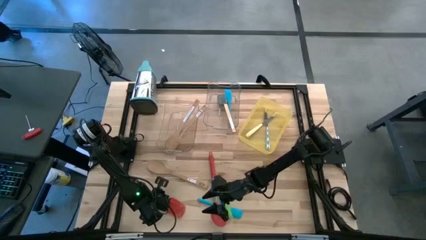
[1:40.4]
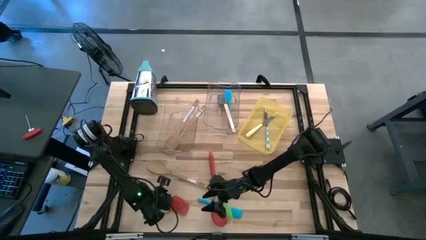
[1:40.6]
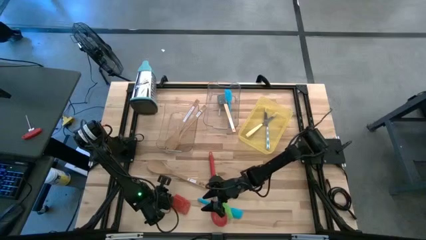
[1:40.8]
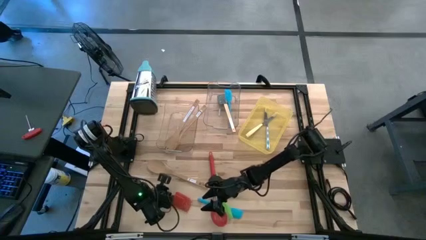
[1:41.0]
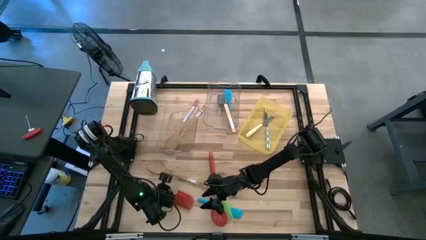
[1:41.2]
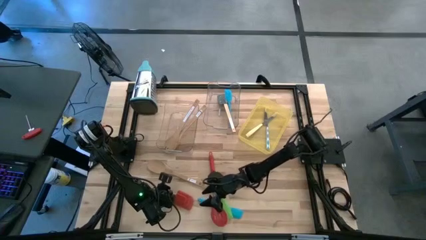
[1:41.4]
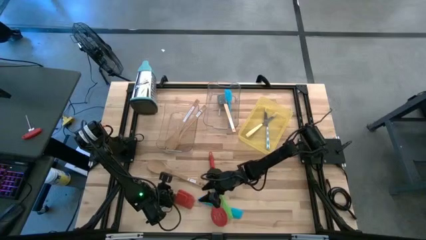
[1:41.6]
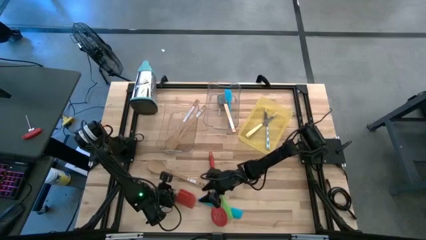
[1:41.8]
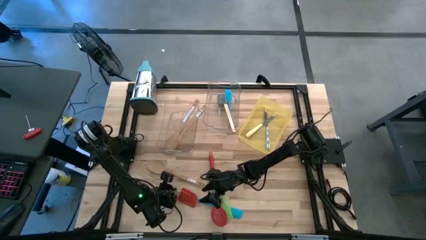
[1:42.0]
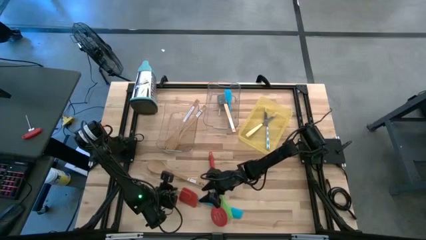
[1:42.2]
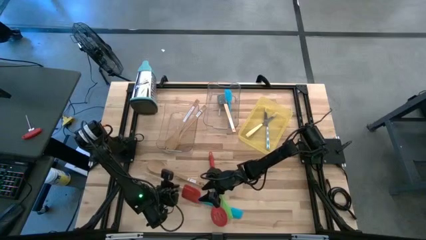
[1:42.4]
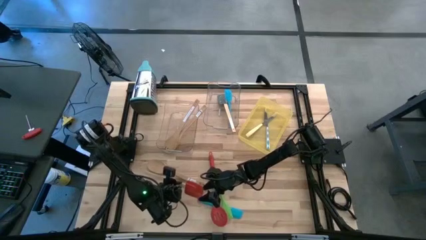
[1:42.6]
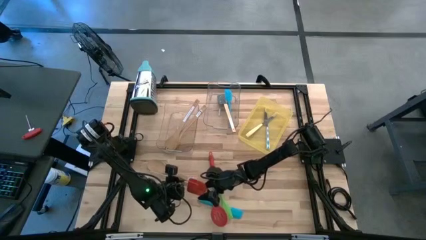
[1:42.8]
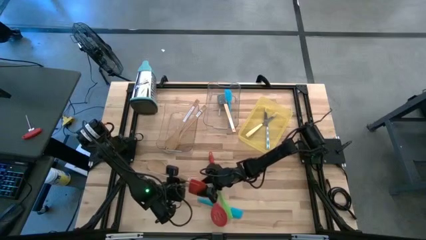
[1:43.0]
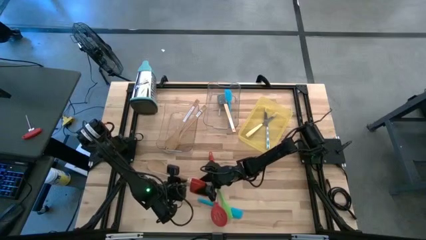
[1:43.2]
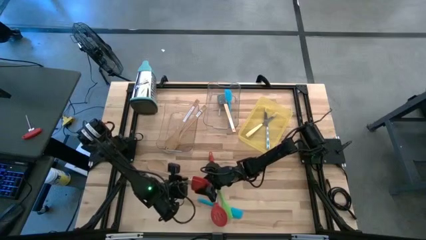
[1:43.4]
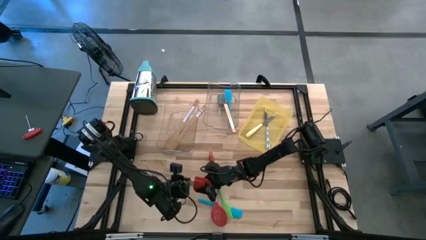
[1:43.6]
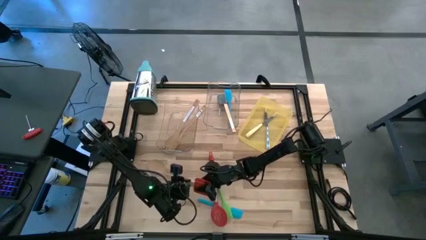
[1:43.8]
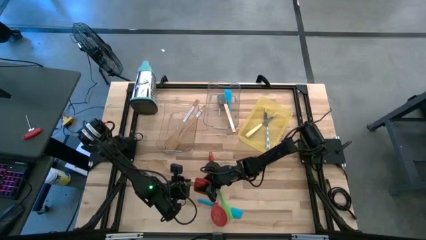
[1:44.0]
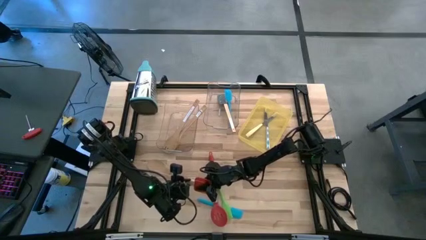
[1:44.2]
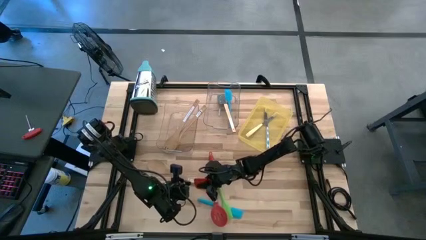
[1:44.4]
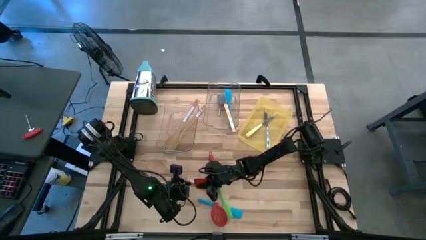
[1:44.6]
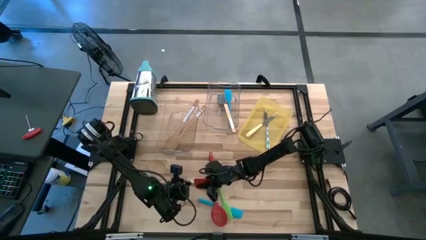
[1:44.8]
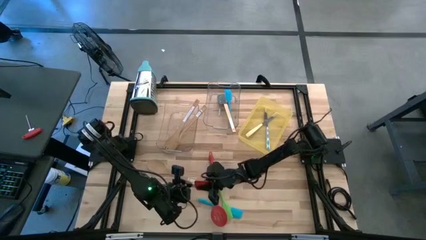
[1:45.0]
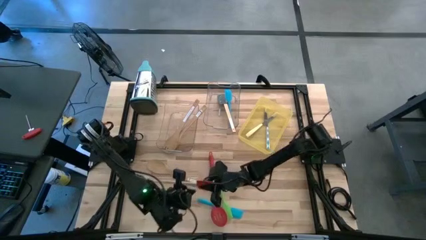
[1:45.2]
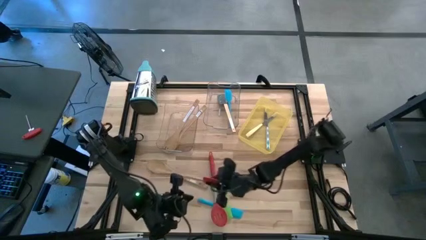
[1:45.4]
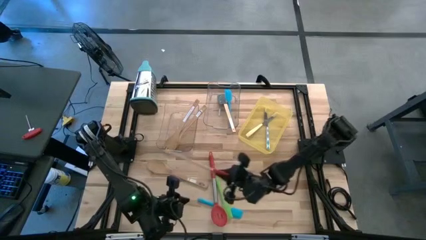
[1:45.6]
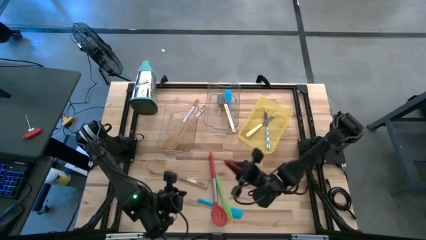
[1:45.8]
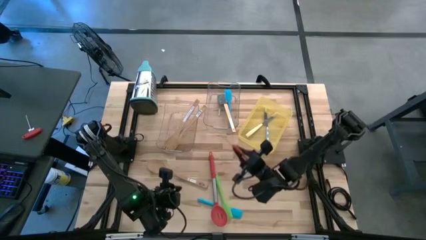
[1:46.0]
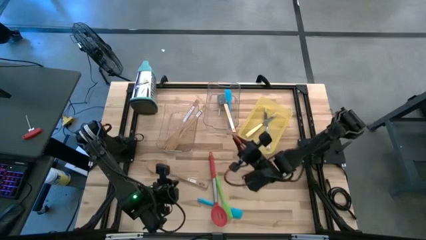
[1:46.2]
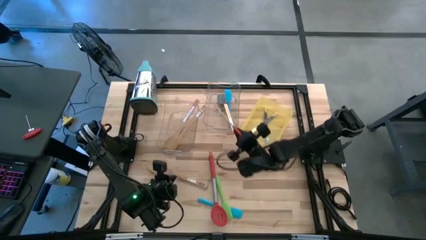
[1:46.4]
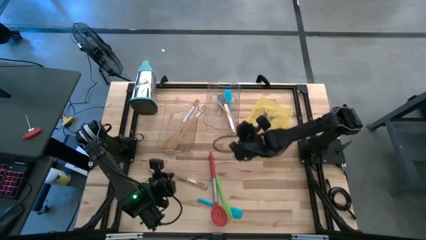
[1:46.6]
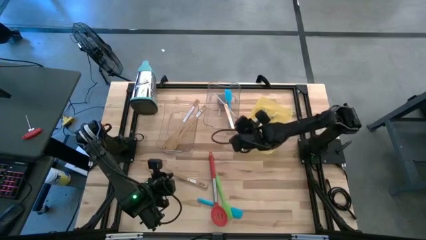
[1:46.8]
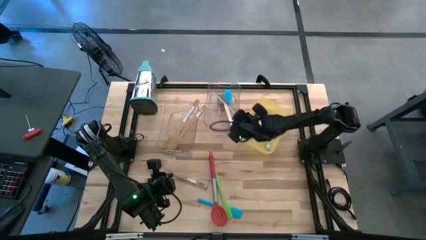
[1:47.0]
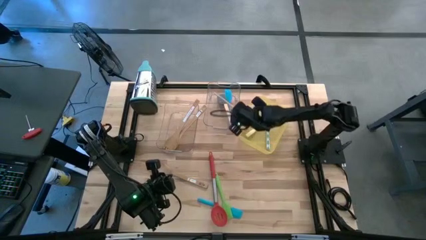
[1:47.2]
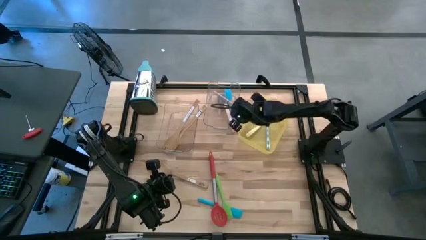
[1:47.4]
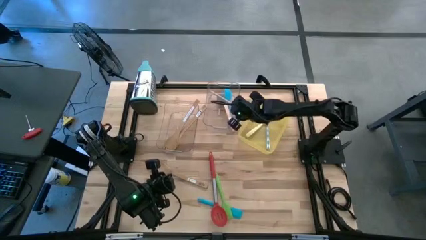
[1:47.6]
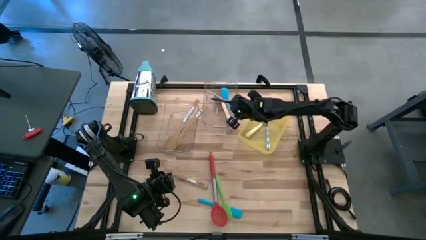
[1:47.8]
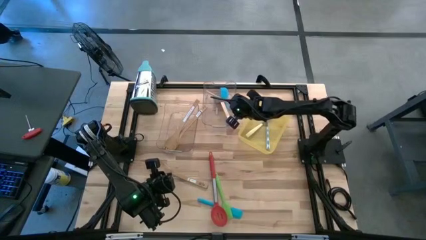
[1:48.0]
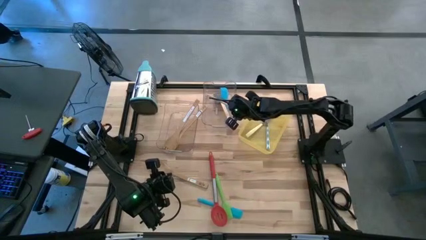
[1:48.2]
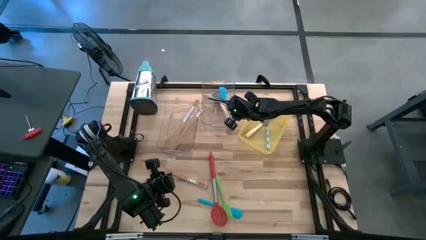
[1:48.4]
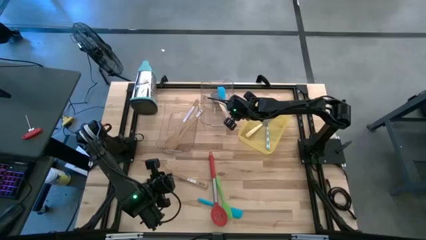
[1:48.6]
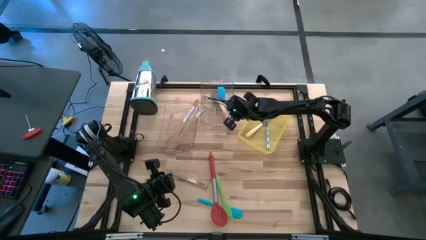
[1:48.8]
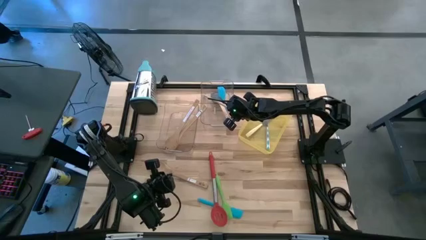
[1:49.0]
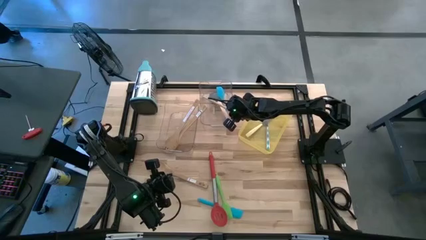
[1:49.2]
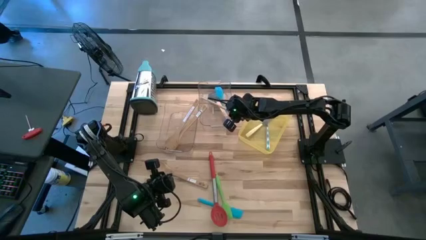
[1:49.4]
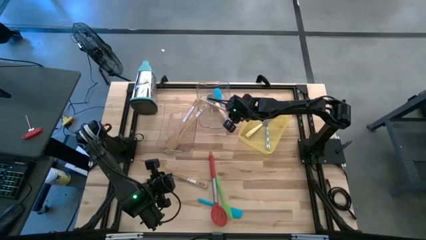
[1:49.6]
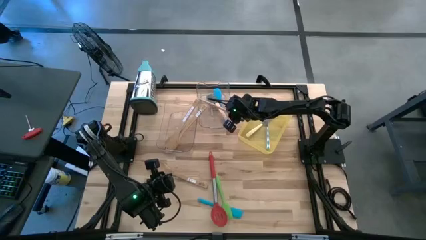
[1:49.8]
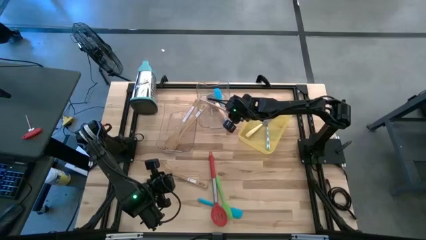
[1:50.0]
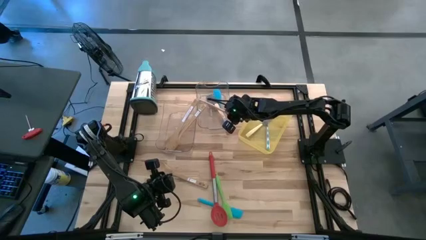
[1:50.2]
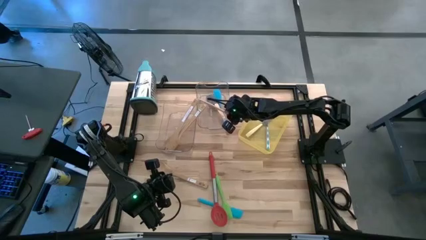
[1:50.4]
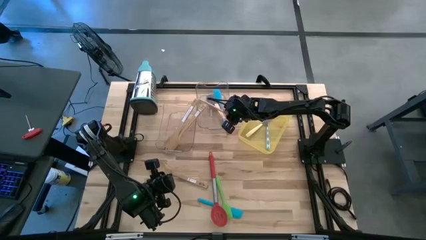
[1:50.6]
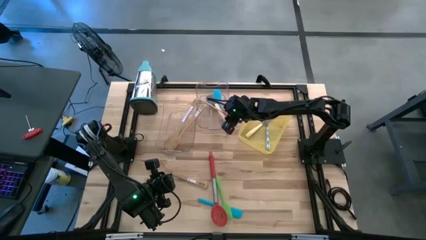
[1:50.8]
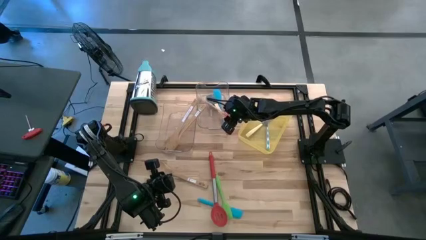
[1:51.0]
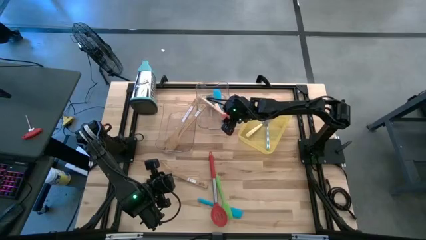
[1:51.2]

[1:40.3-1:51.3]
Task: Pick & Place Kitchen Items
Put the red spatula into the top right transparent bin

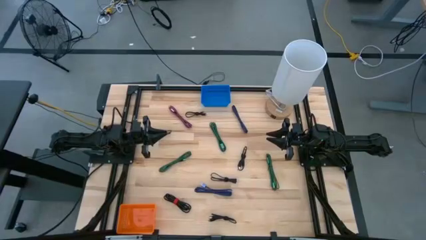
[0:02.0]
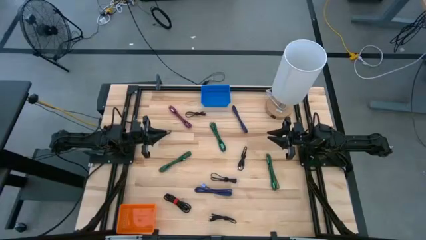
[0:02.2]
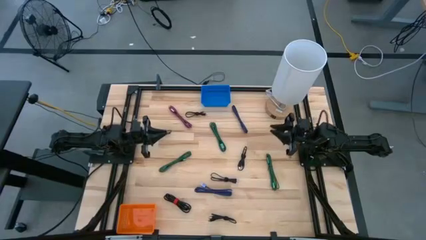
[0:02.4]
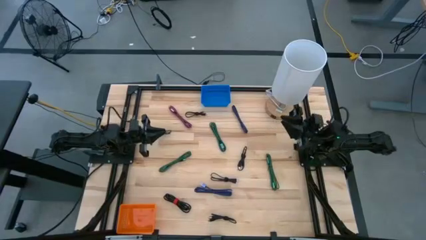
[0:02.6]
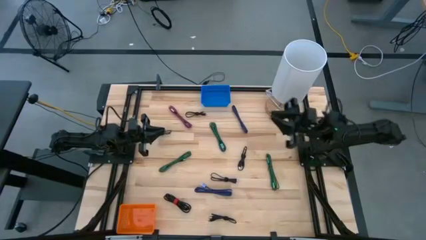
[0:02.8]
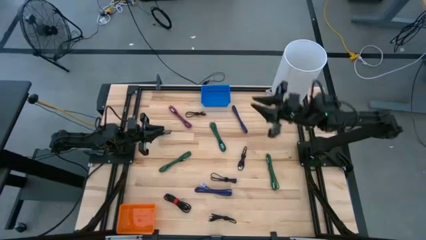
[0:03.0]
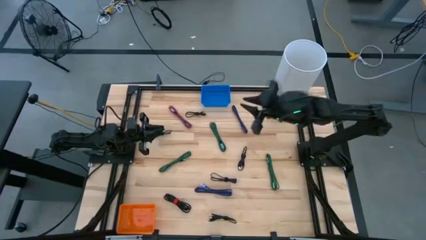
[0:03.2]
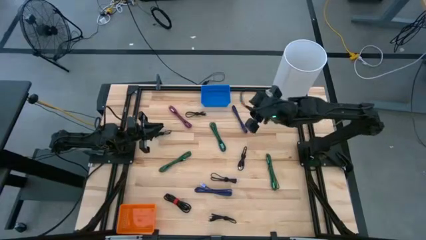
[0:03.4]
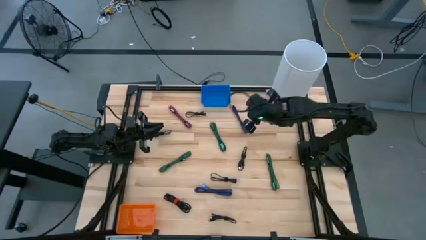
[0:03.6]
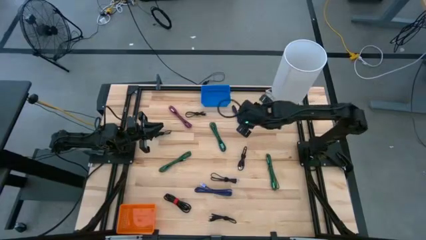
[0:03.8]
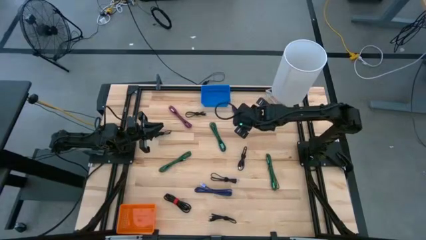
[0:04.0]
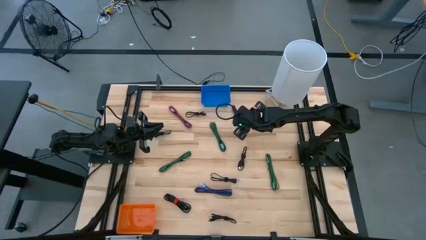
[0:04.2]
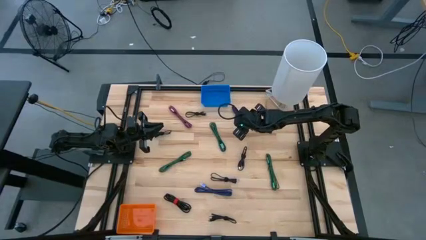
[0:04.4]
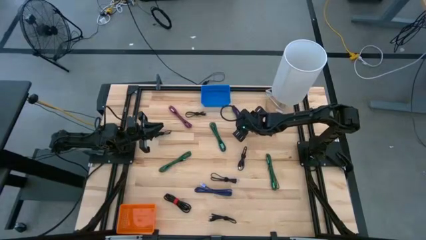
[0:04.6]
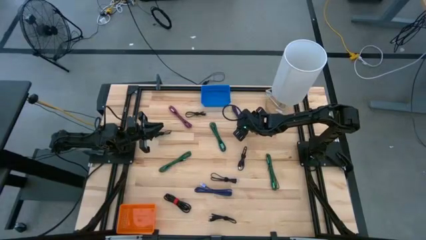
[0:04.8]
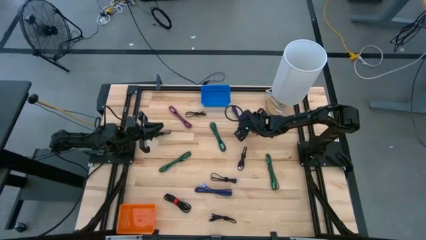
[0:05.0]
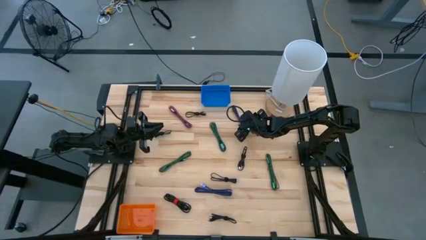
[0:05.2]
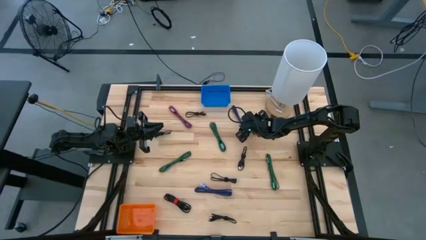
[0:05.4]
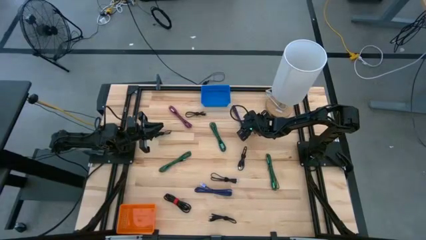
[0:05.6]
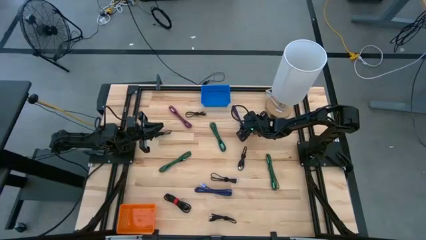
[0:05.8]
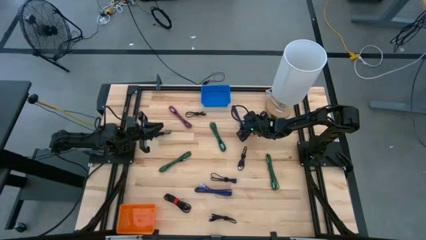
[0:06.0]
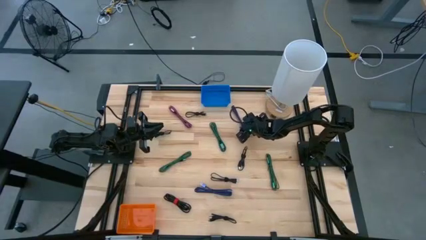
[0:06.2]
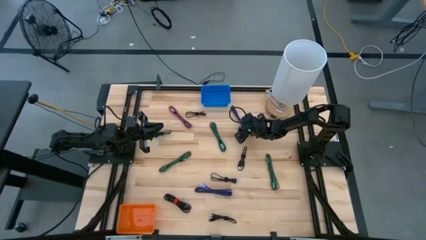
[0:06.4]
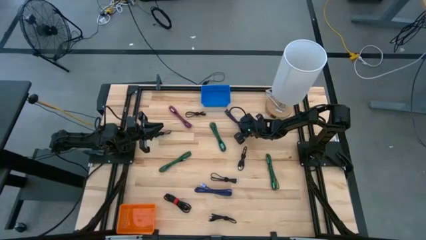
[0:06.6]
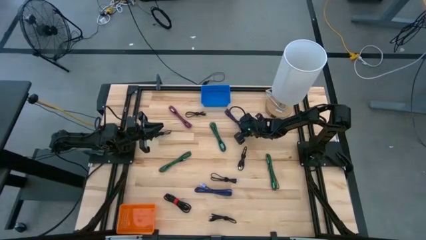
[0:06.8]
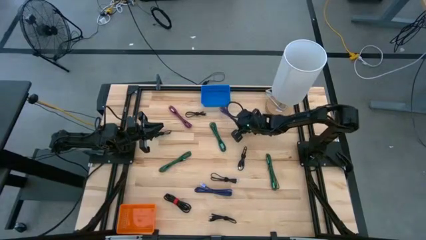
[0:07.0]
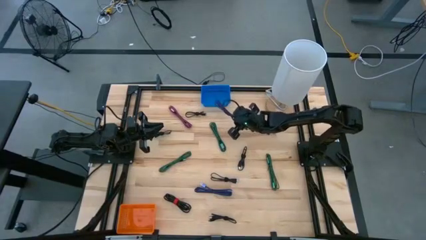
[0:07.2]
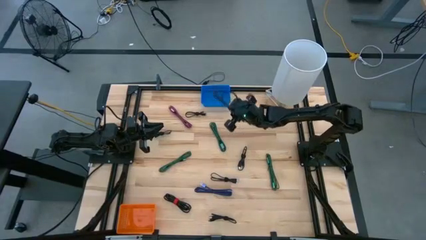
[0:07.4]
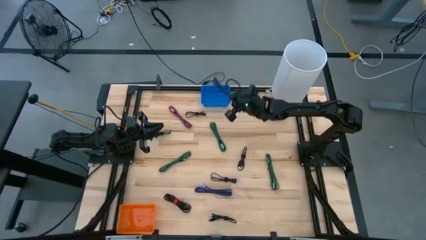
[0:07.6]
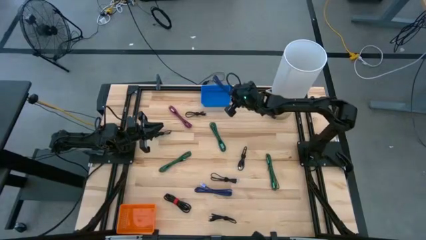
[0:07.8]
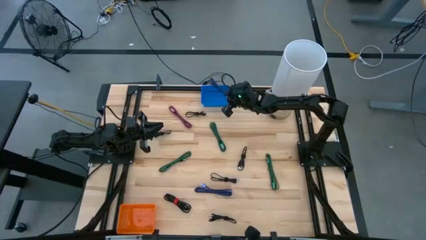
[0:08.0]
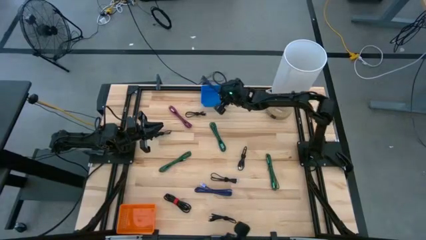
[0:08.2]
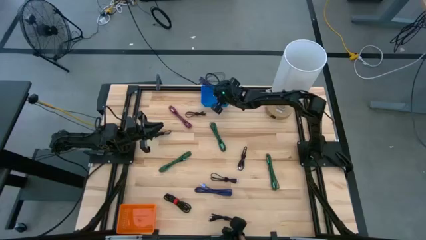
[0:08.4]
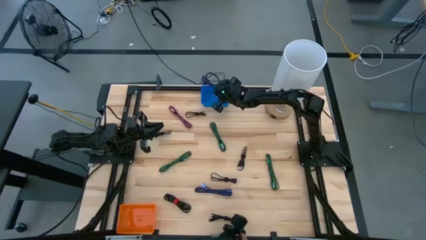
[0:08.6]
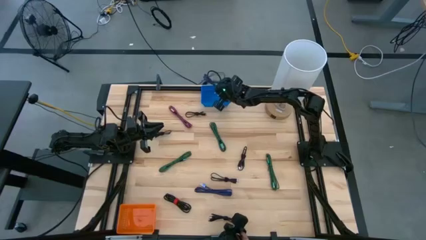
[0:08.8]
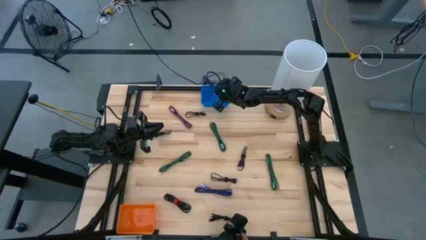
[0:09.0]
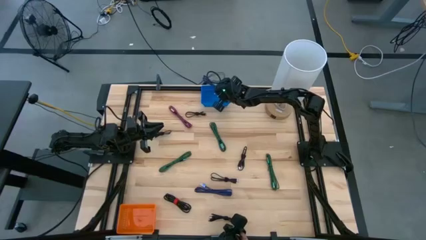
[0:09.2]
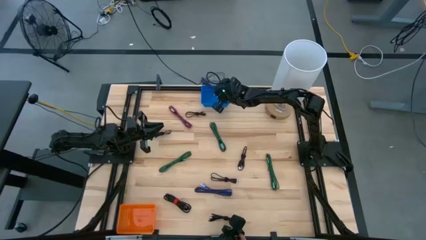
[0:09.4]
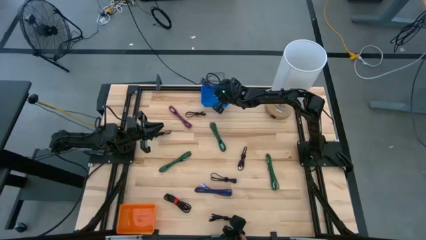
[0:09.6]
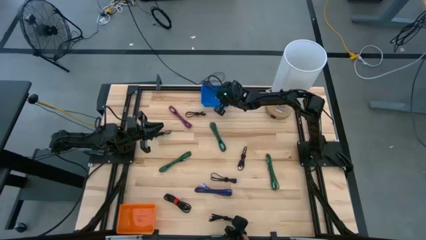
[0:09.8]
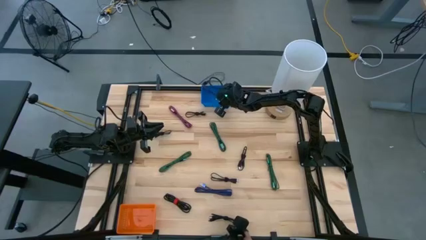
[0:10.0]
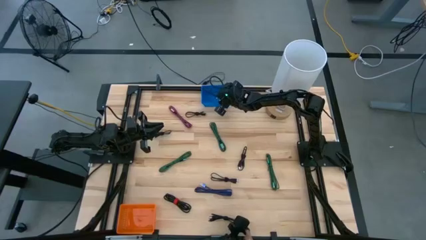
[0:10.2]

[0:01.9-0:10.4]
Task: Pick & Place USB Port
Put the blue charger cable into the blue basket
